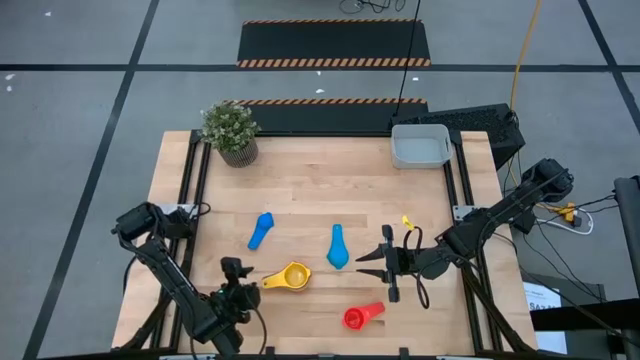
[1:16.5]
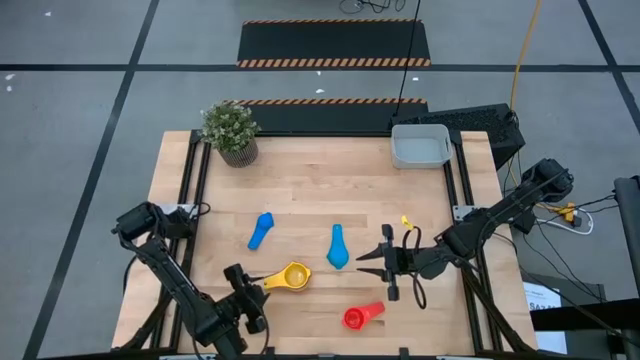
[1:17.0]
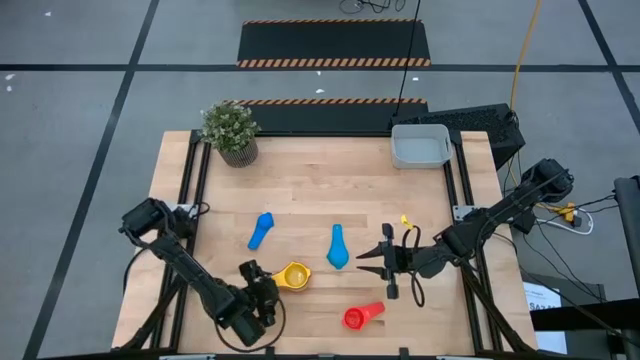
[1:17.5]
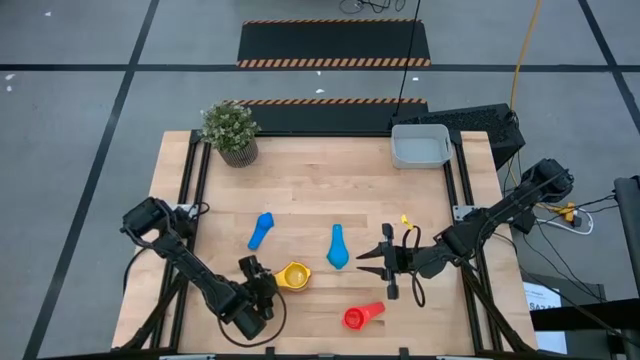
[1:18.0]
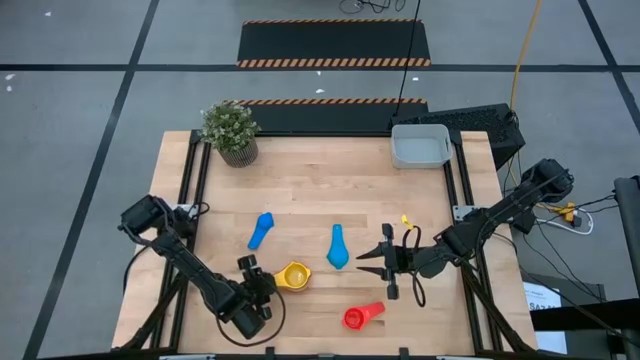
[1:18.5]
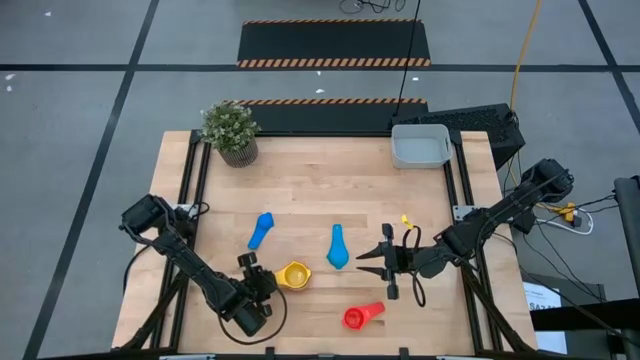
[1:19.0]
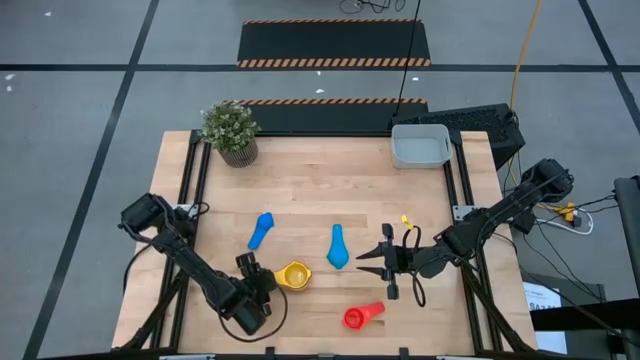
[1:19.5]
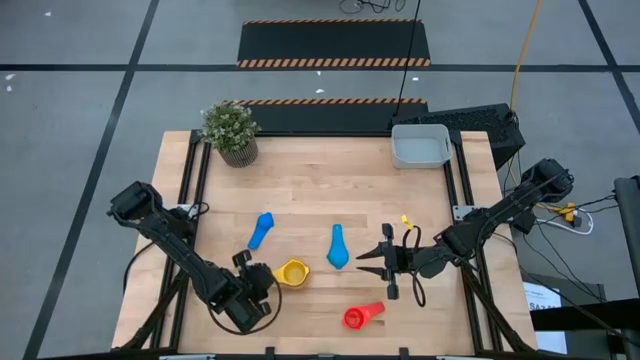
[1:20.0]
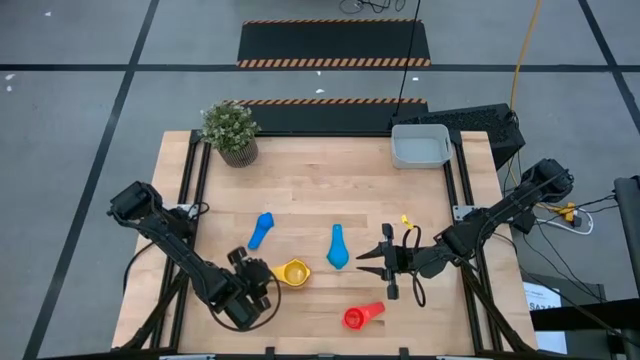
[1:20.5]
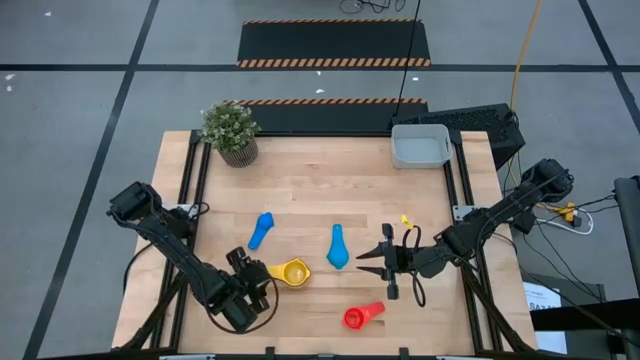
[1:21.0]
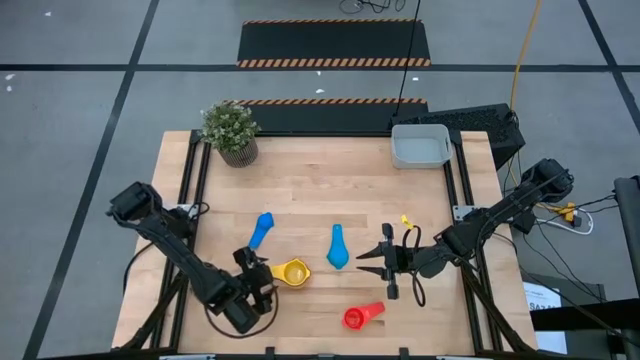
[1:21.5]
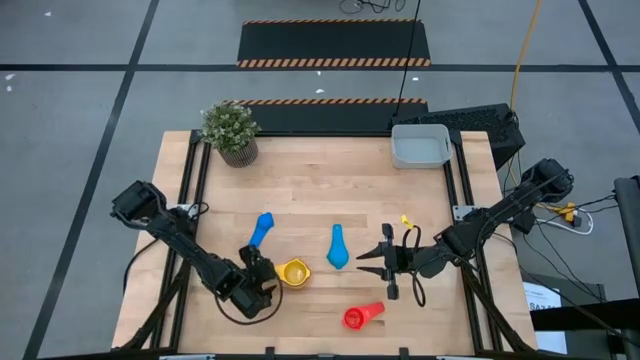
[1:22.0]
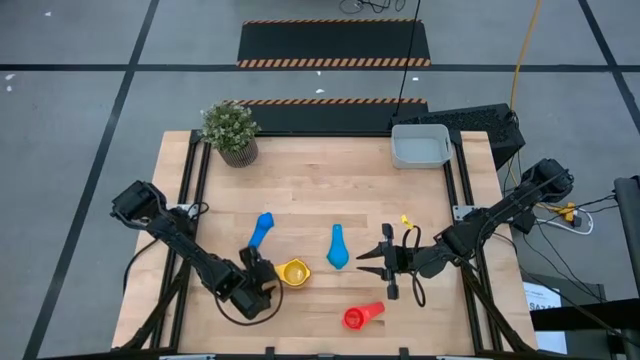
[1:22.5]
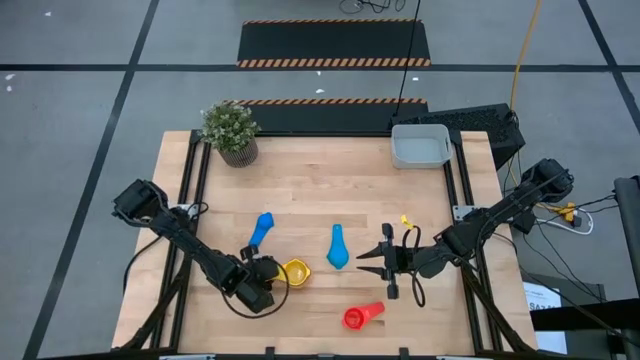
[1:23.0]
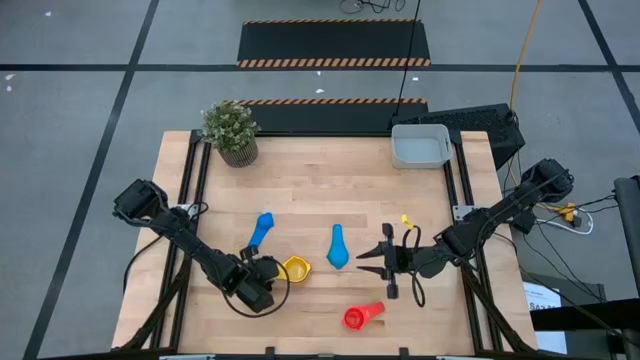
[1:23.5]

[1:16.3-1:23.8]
Task: Nest measuring cups in basket
Adjust the stacked measuring cup on the table

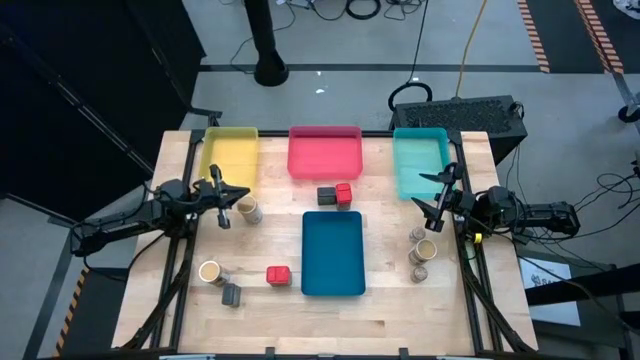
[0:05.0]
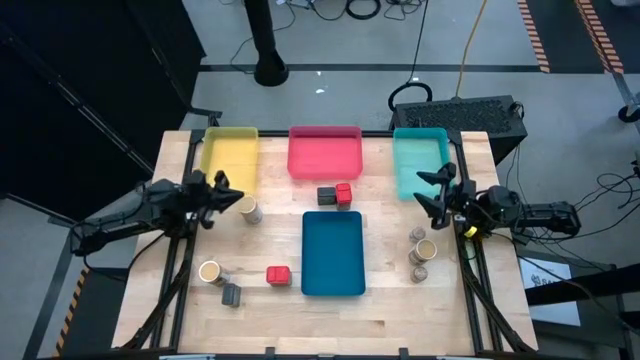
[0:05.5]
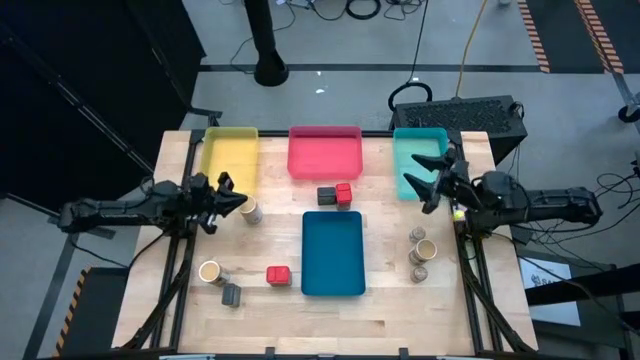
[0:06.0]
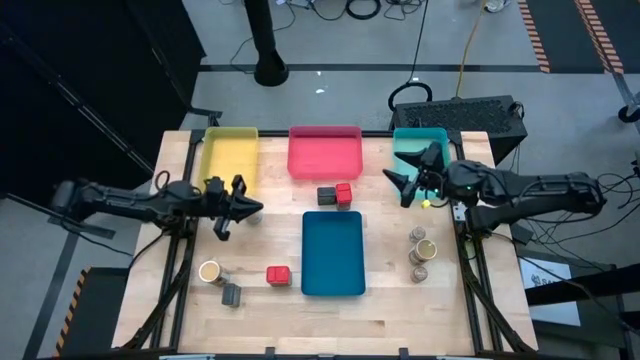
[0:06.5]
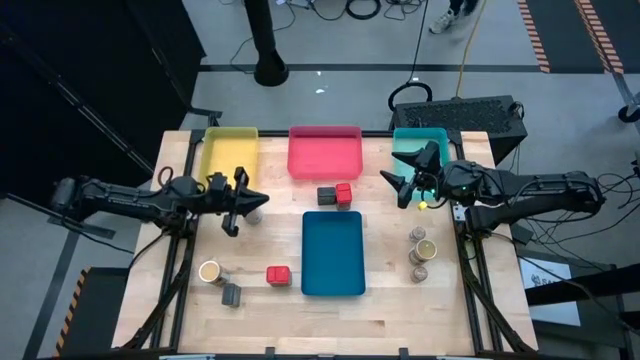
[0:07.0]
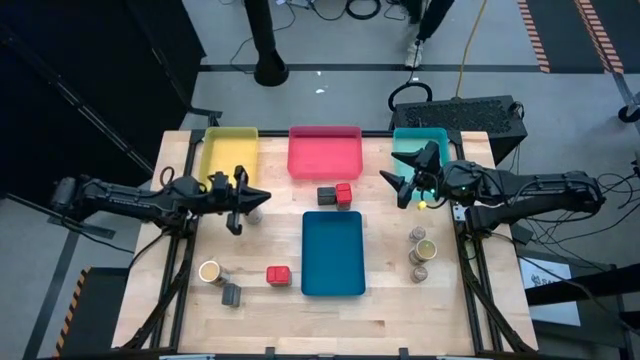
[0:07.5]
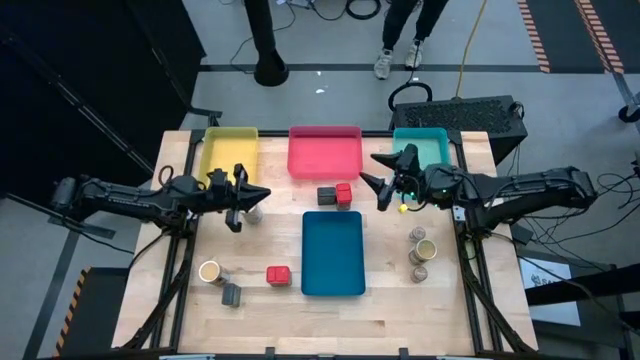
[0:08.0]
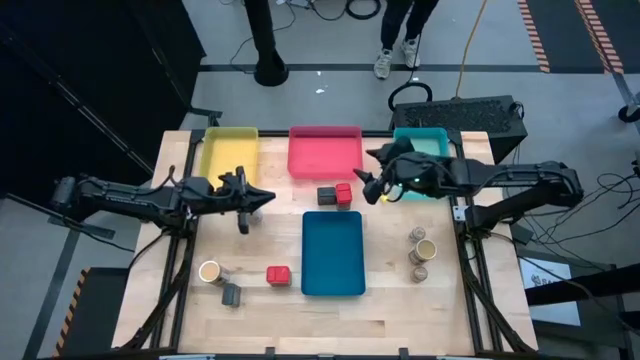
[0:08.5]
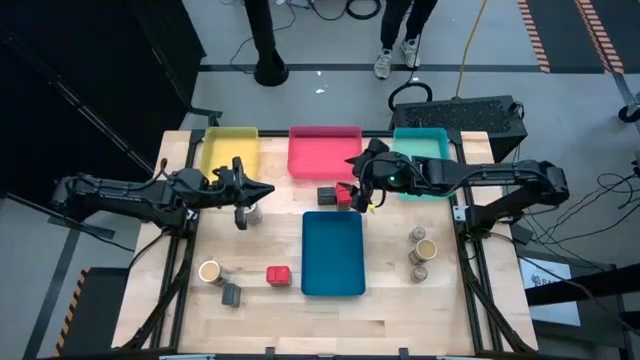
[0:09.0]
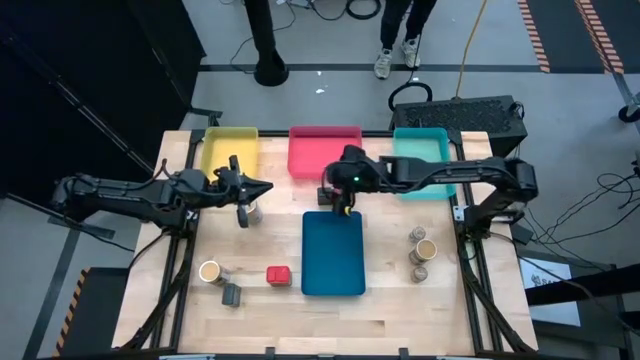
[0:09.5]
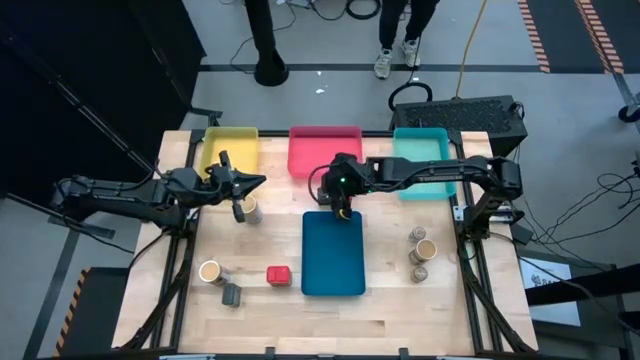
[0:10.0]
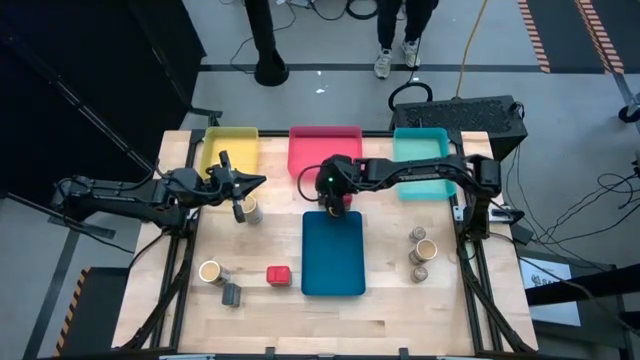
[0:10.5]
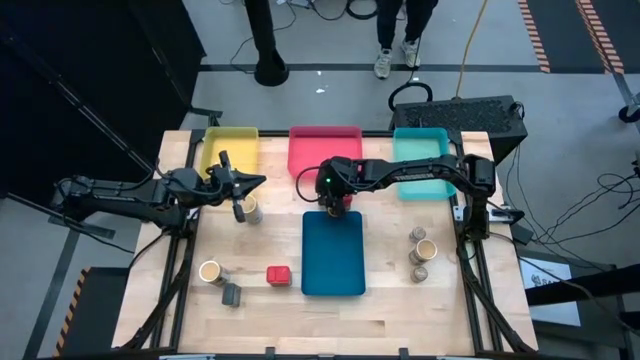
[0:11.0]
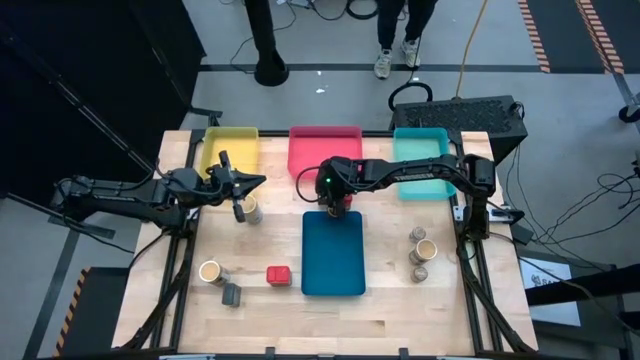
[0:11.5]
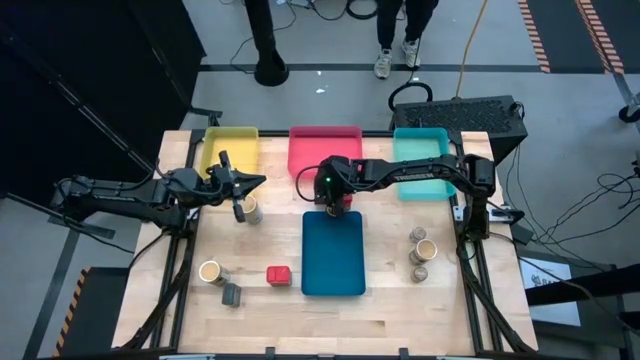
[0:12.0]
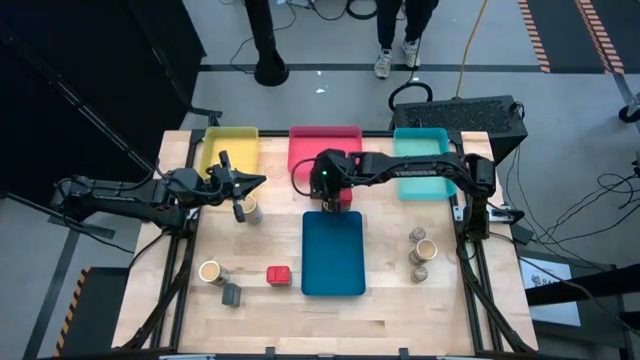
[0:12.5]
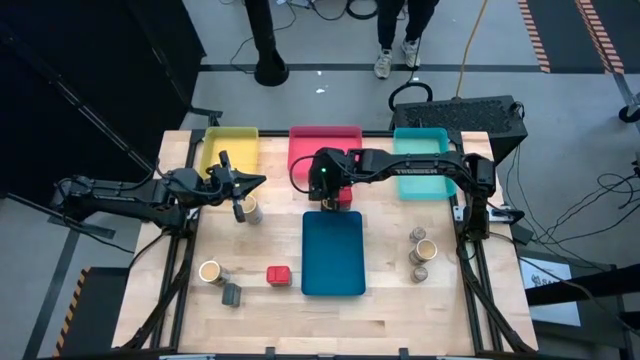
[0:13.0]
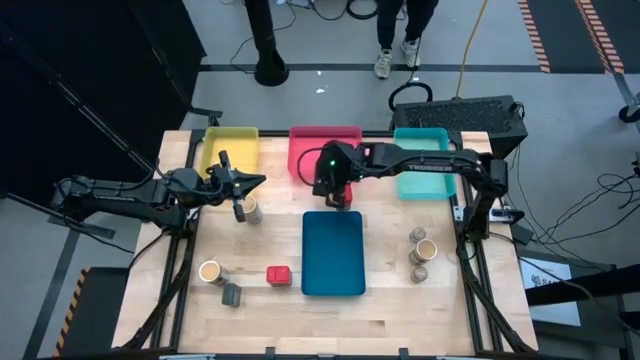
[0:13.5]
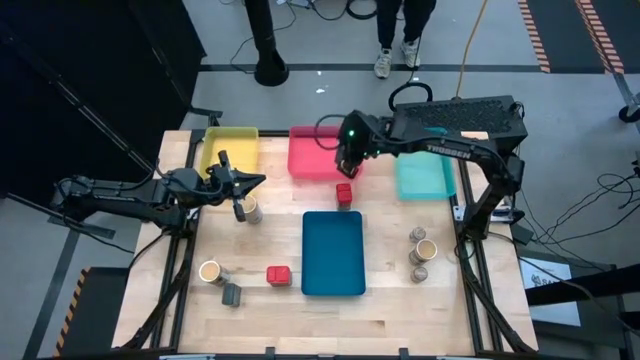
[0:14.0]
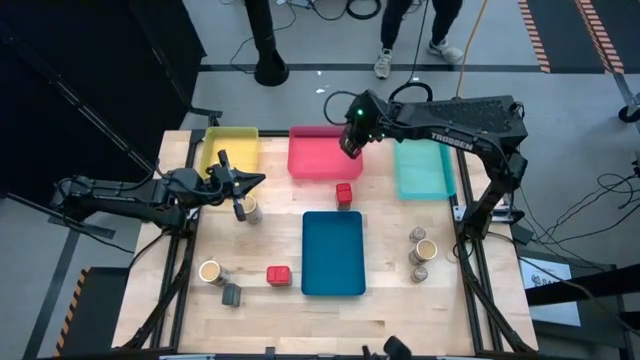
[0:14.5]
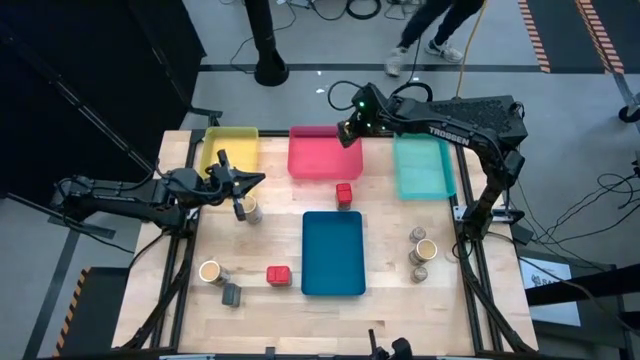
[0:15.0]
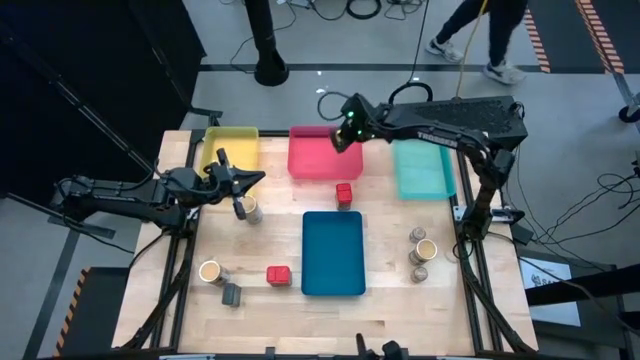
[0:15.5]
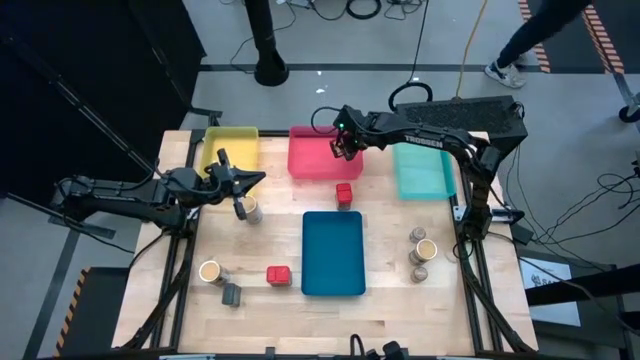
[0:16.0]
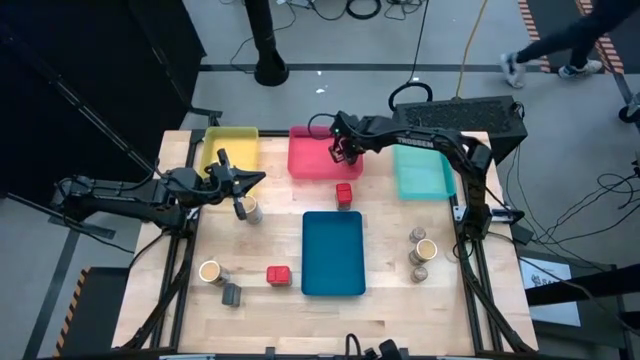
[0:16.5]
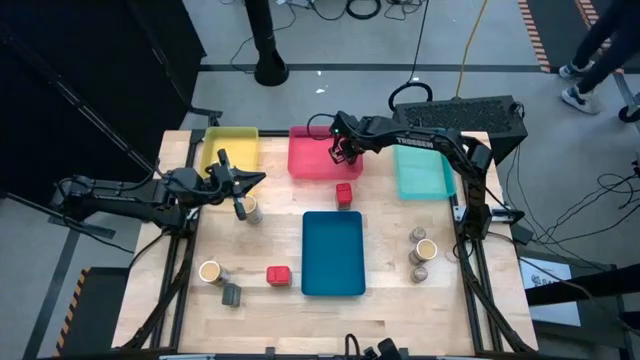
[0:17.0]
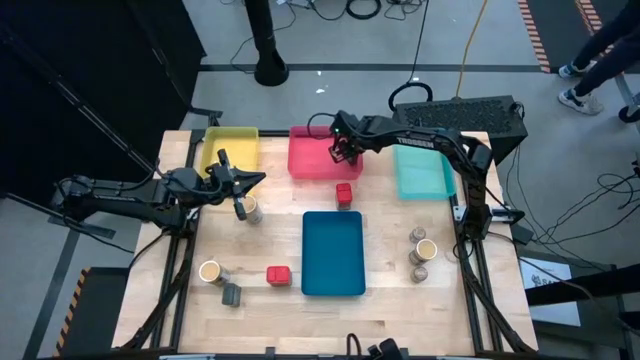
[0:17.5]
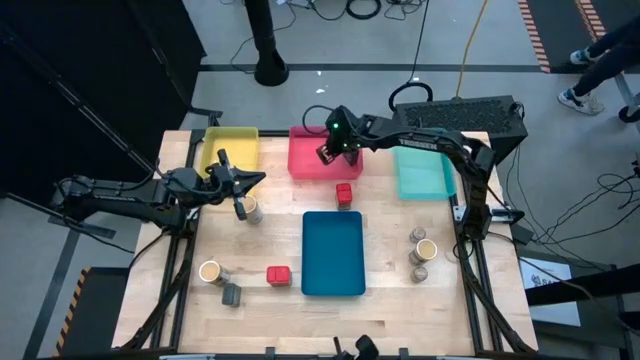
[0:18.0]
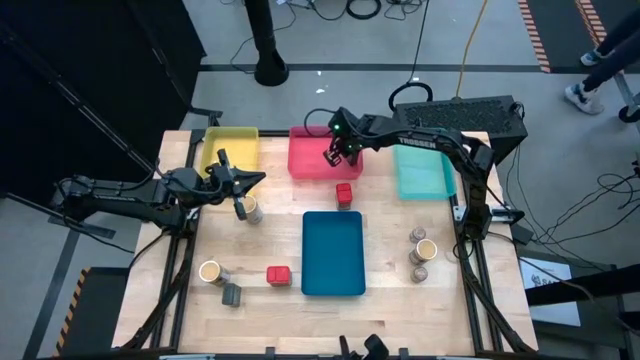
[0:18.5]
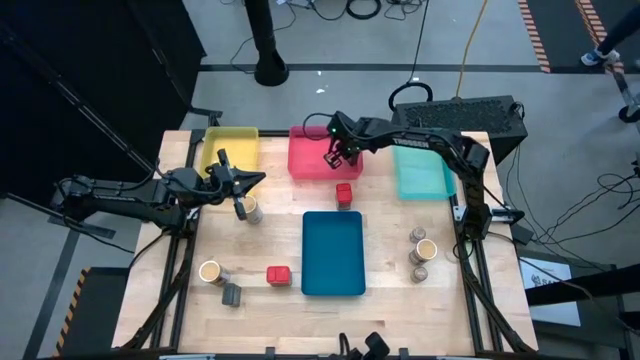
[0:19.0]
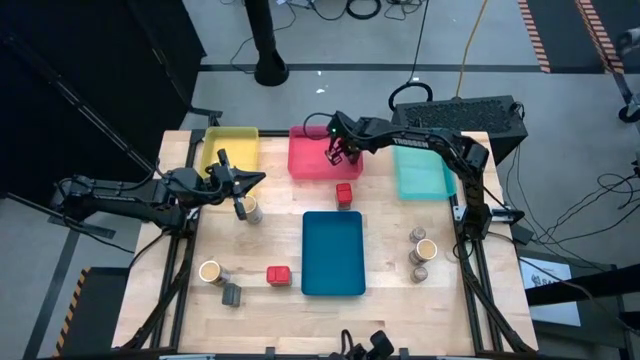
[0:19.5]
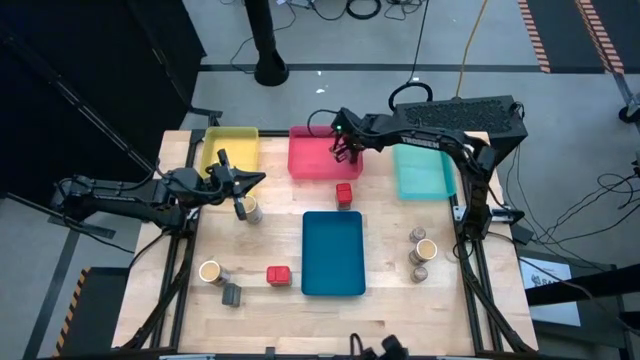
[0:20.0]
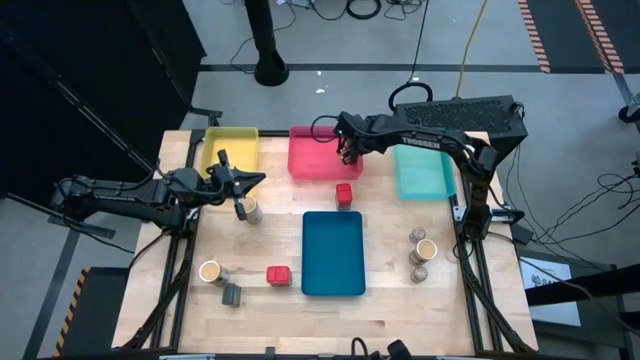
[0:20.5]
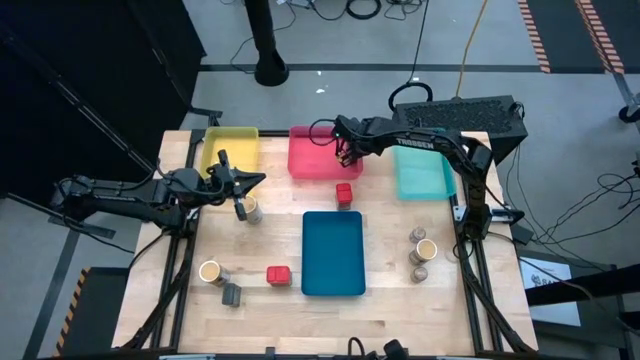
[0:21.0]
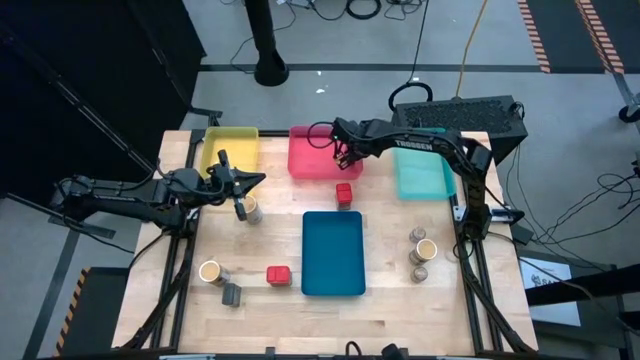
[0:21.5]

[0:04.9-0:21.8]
Task: Sort spices by type
Put the top black seasoning can into the red bin
